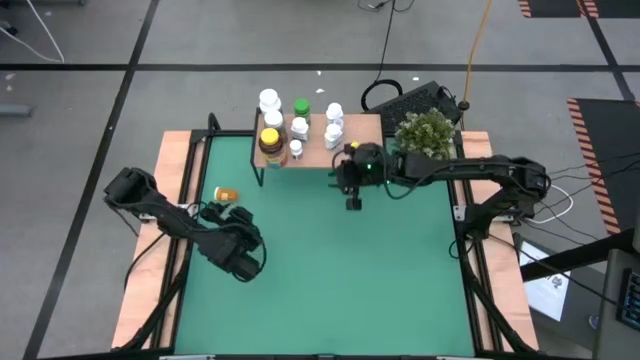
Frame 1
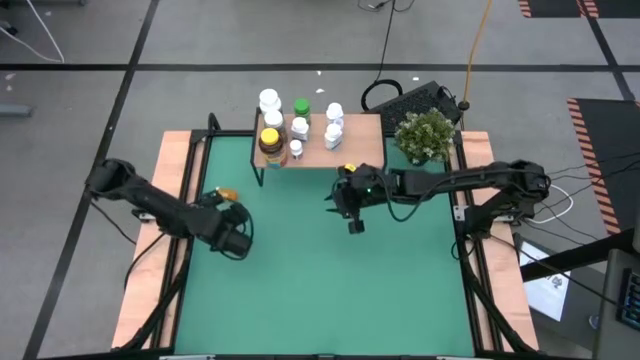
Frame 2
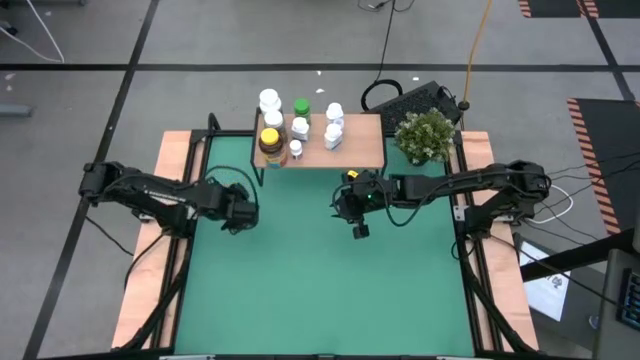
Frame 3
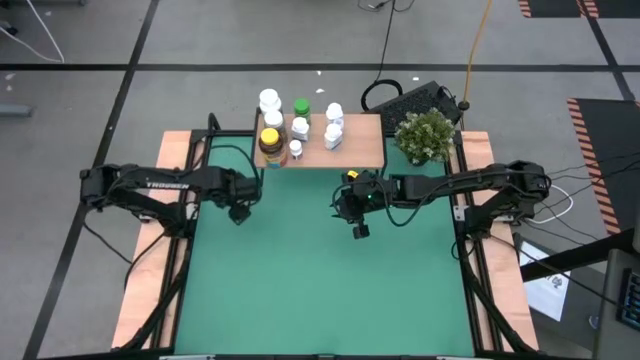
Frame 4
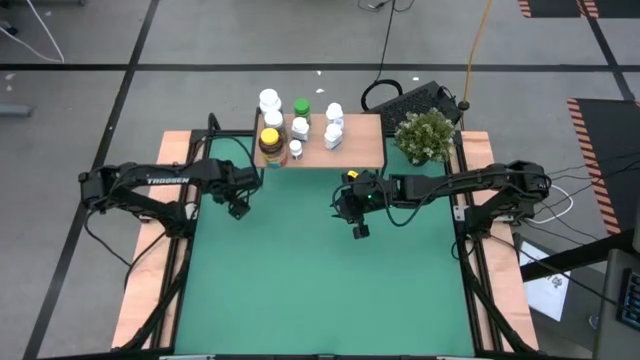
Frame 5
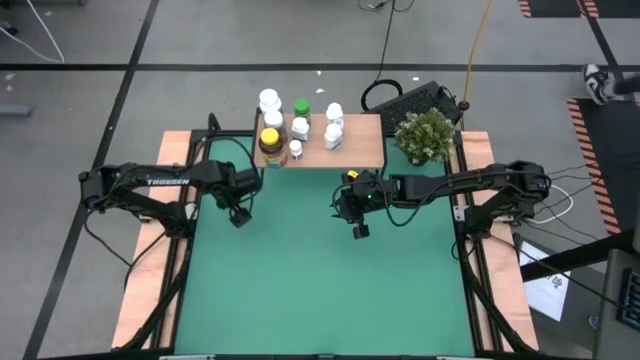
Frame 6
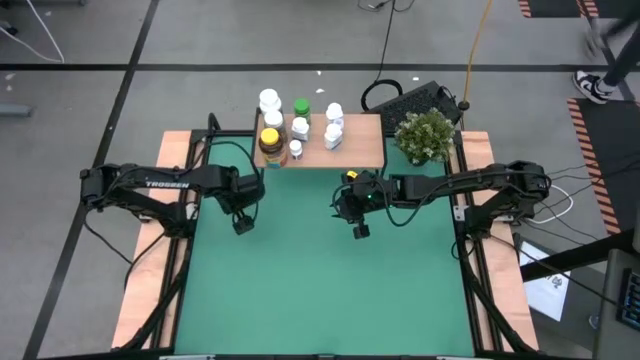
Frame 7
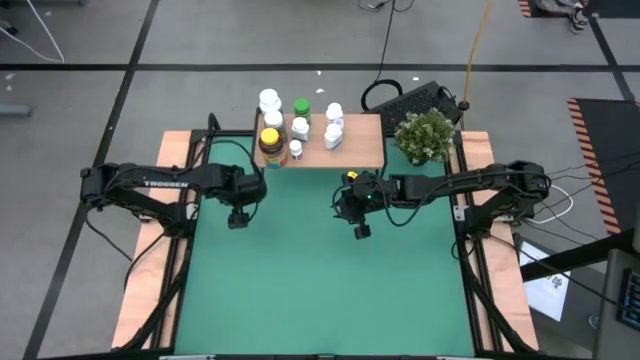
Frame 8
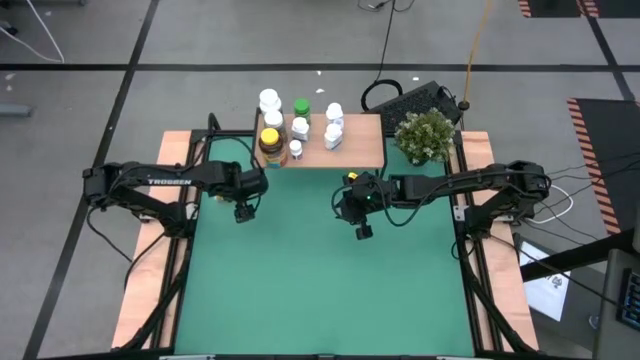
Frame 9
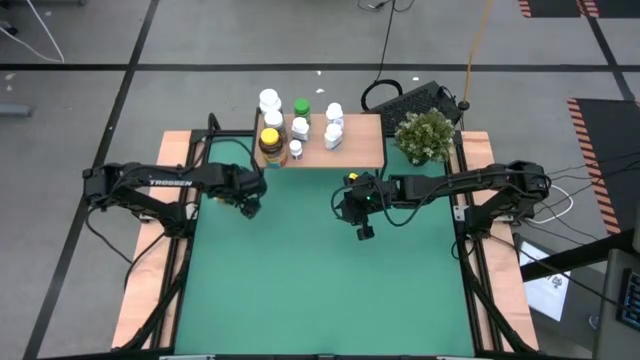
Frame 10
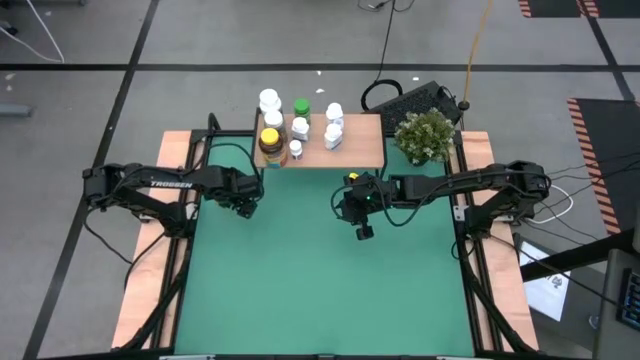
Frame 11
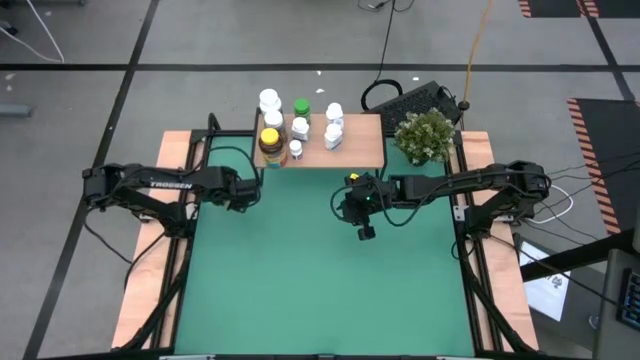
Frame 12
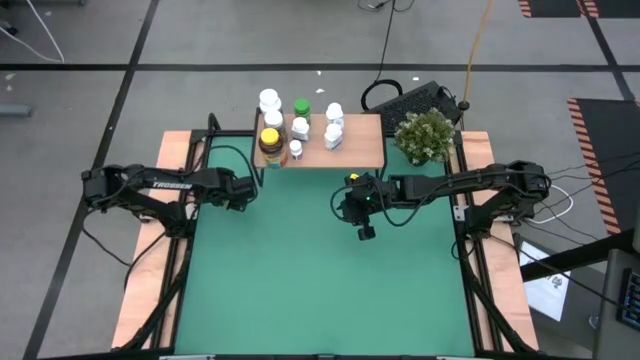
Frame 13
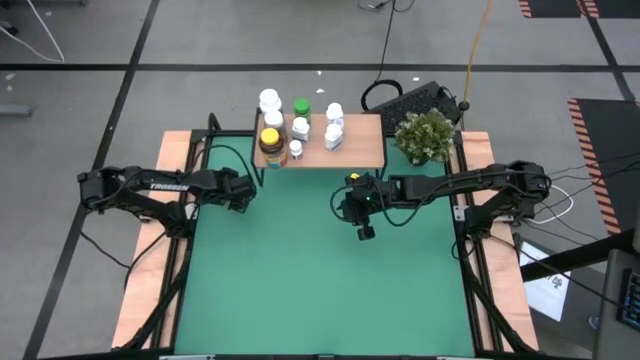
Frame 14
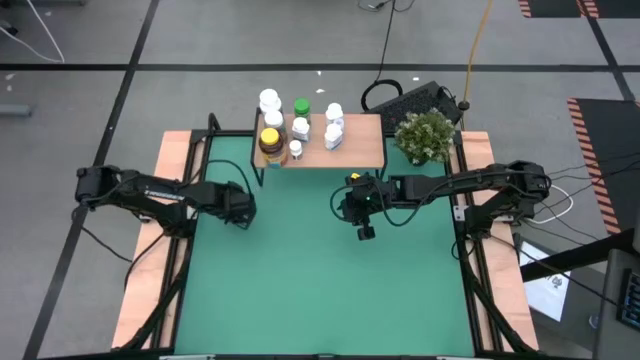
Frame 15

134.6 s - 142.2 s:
Task: Pick and place medicine bottles onto shelf by color
Put the orange pill bottle on the shelf

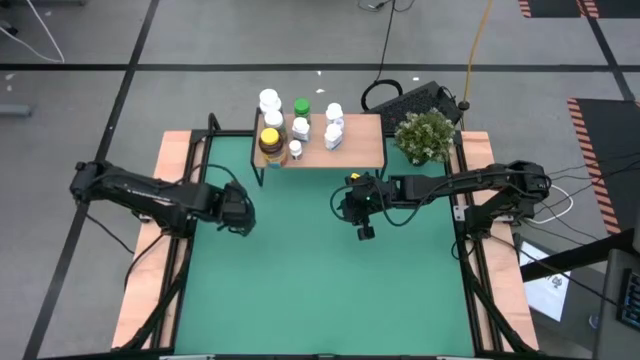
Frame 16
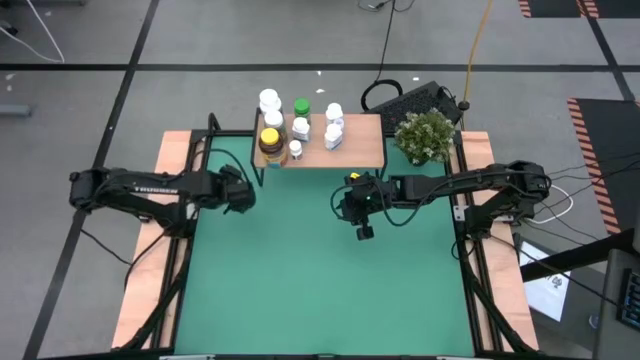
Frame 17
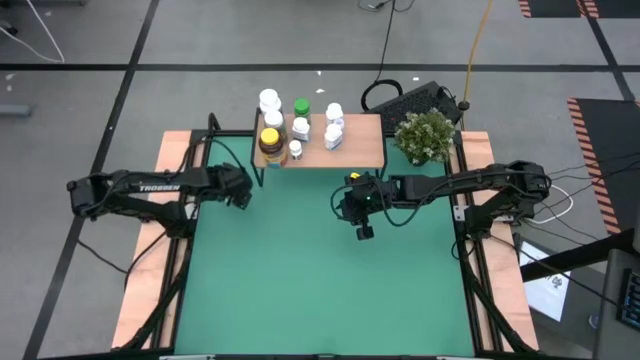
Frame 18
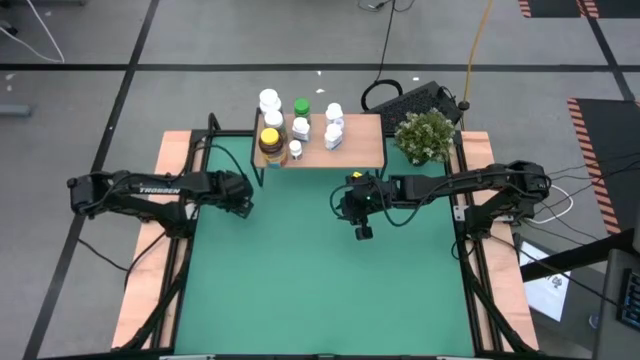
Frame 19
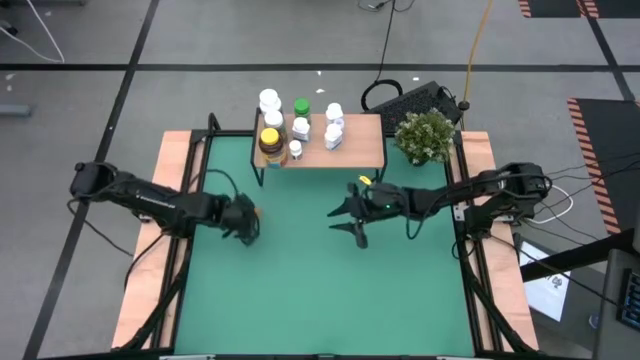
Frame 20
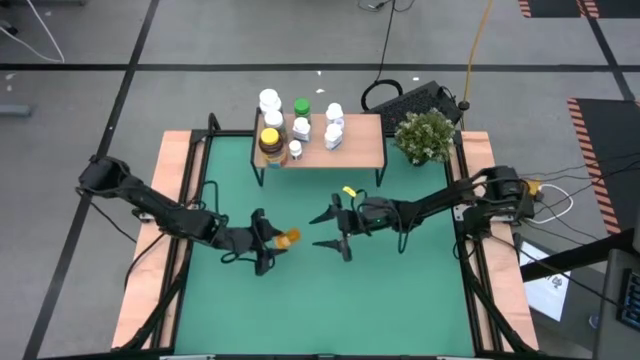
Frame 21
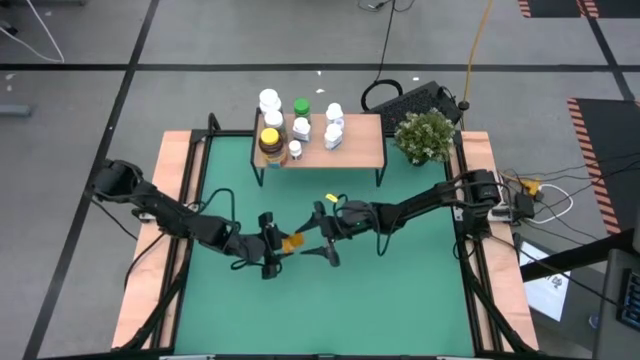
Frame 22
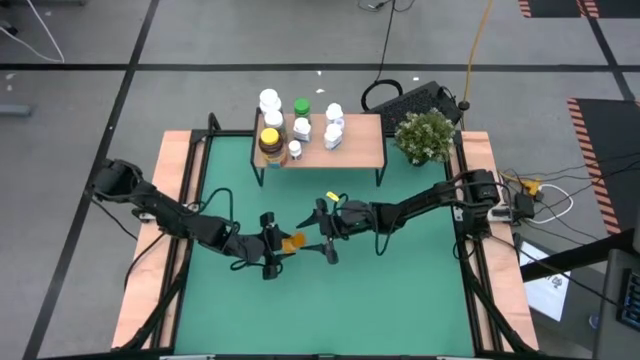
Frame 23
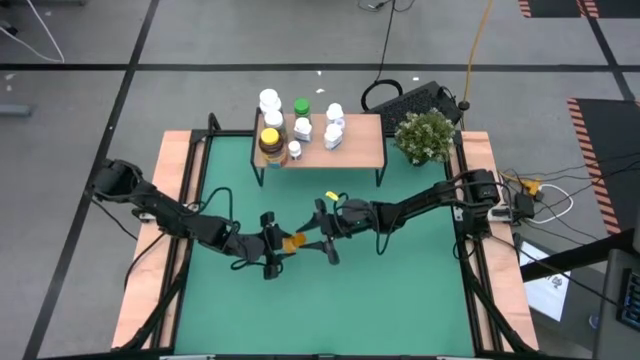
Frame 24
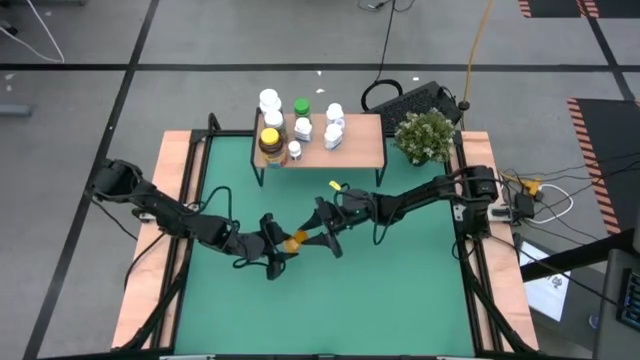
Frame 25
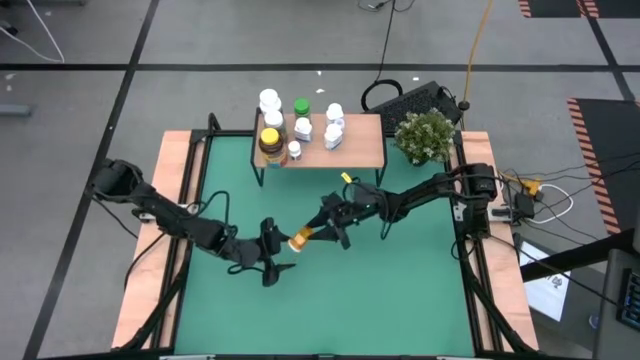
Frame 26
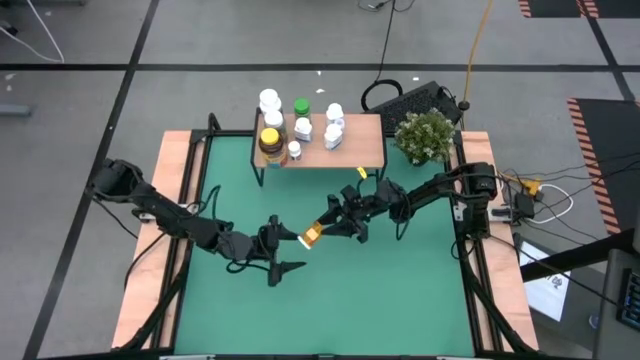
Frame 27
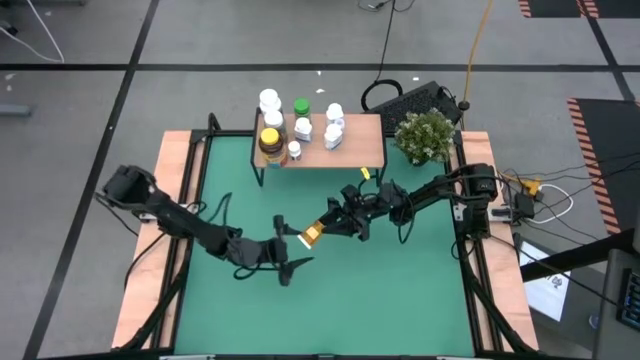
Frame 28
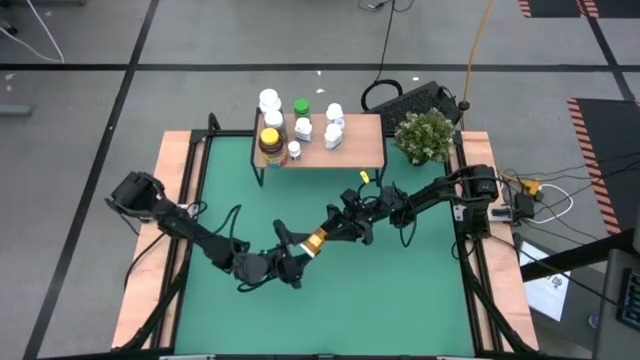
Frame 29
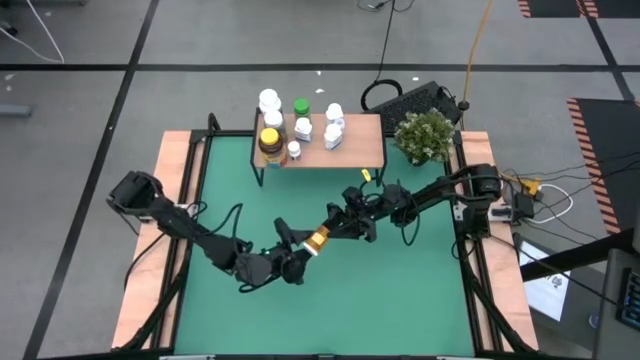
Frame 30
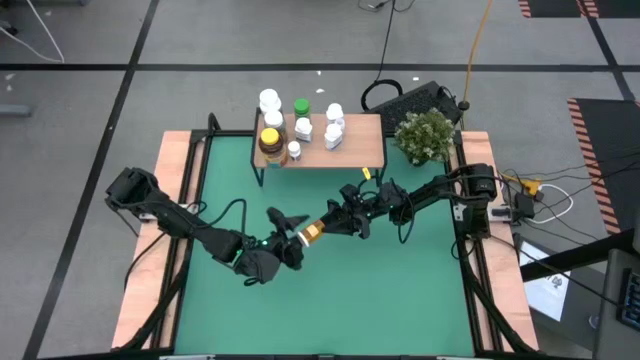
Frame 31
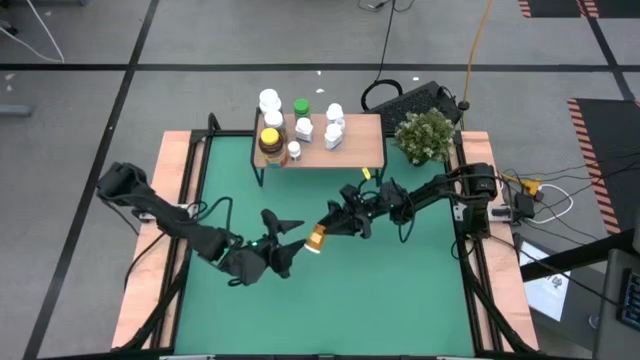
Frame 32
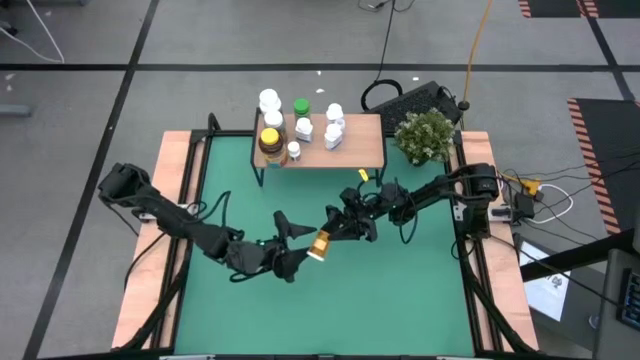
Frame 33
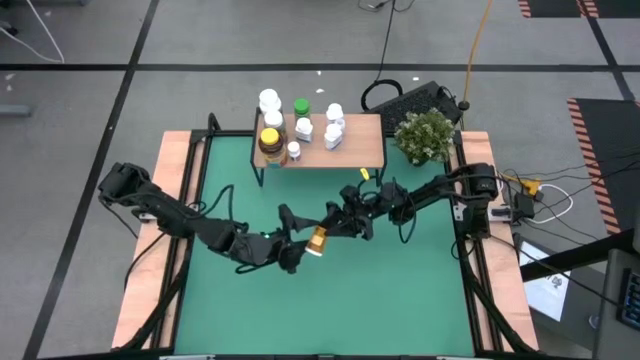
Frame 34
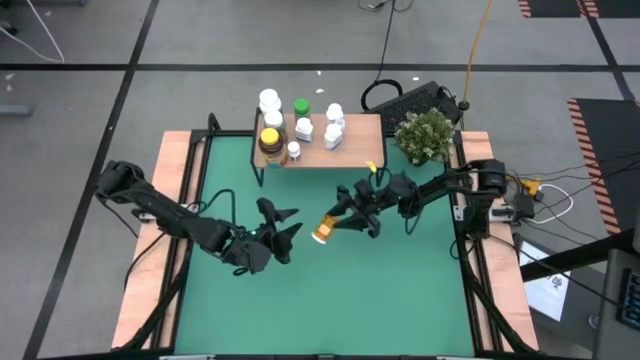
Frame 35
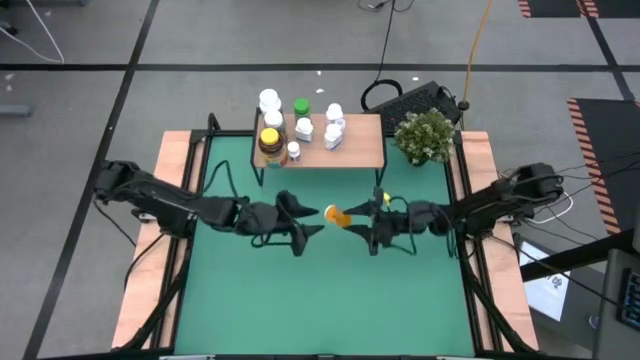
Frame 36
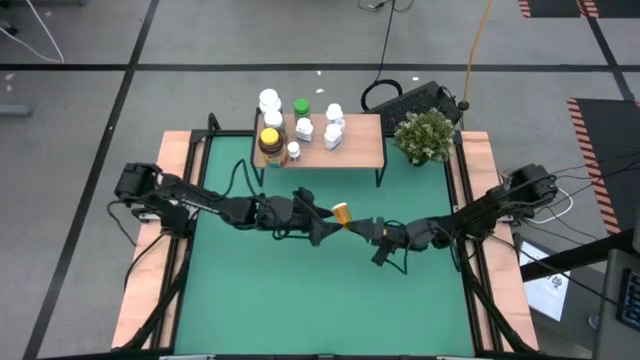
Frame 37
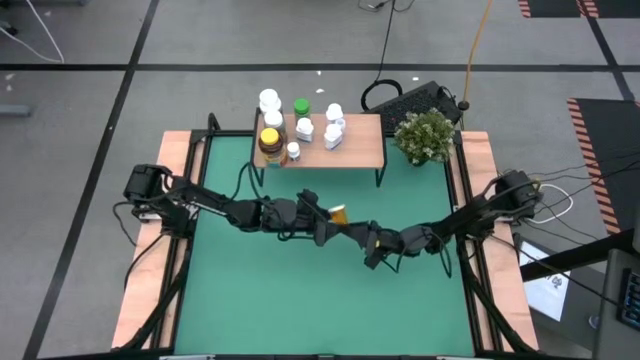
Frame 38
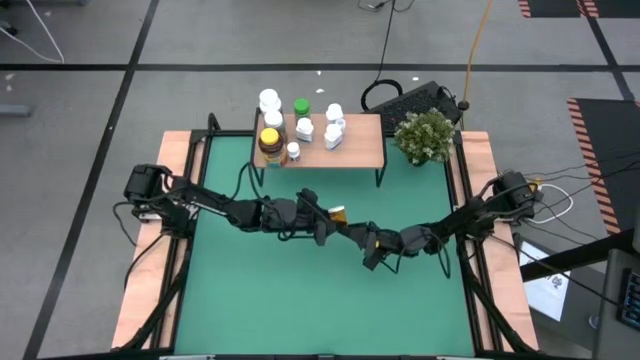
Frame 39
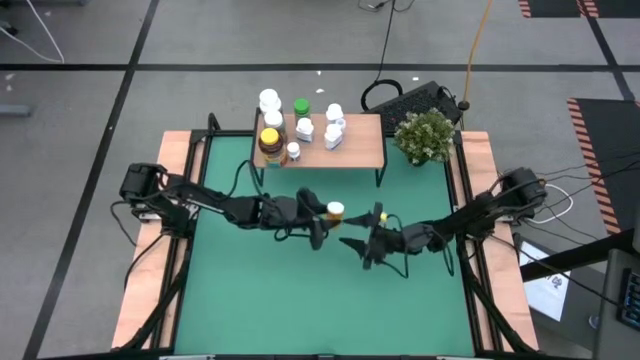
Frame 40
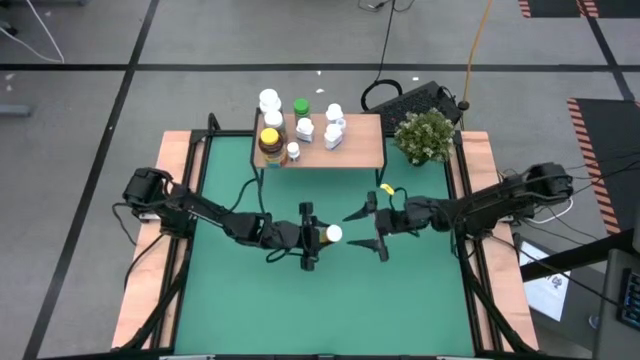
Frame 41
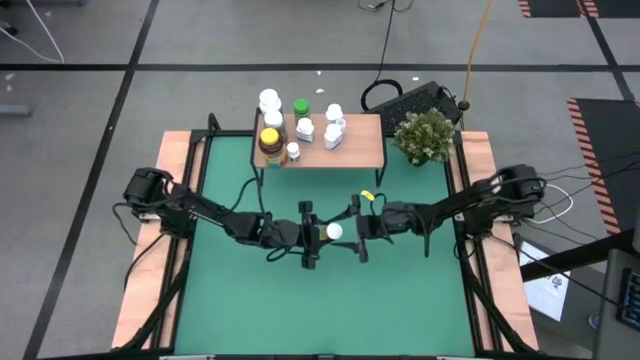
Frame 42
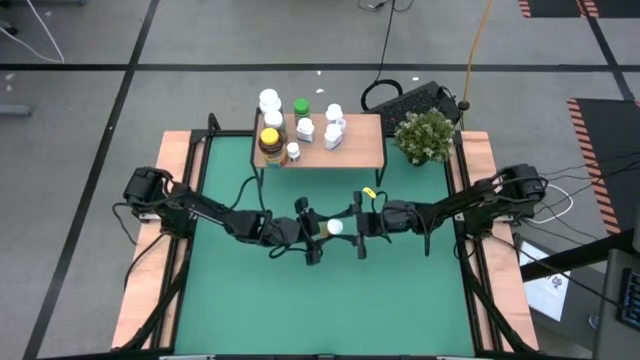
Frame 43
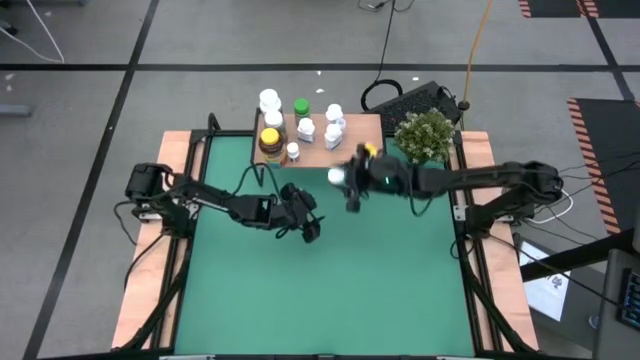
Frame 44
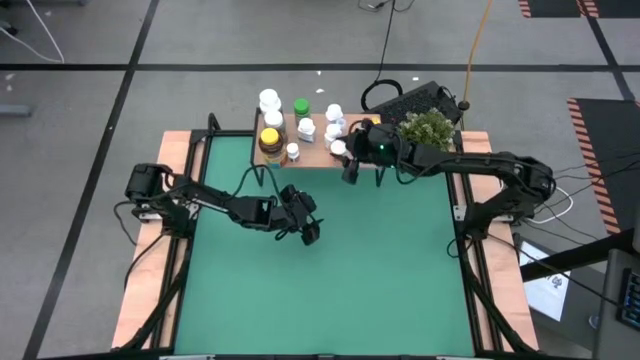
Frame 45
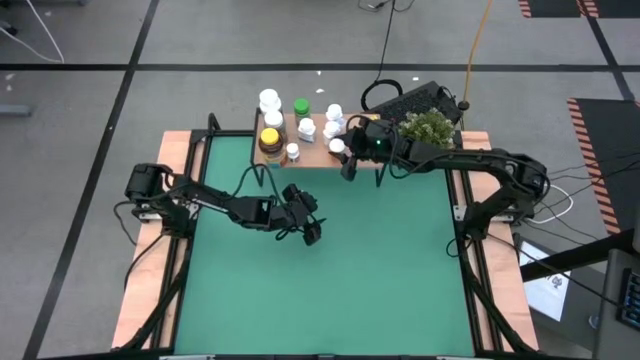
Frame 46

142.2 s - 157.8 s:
Put the orange pill bottle on the shelf
